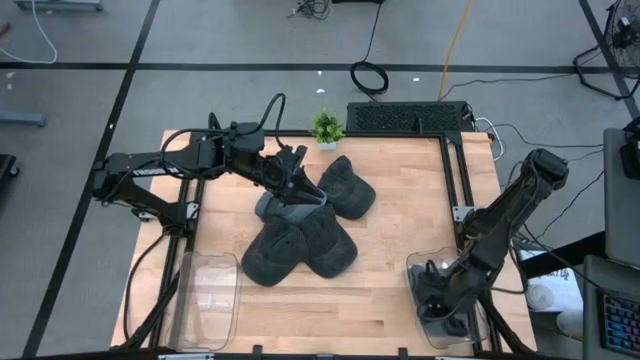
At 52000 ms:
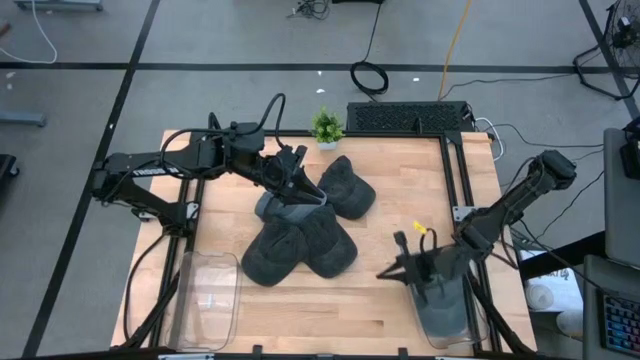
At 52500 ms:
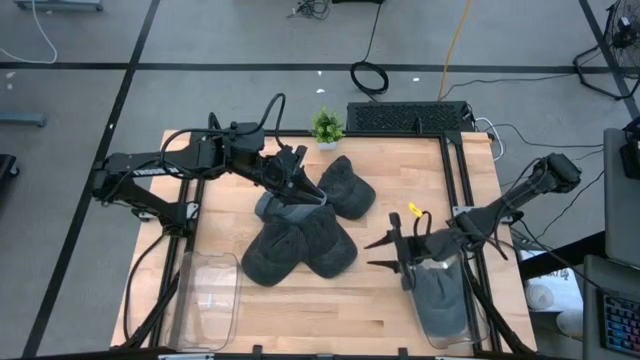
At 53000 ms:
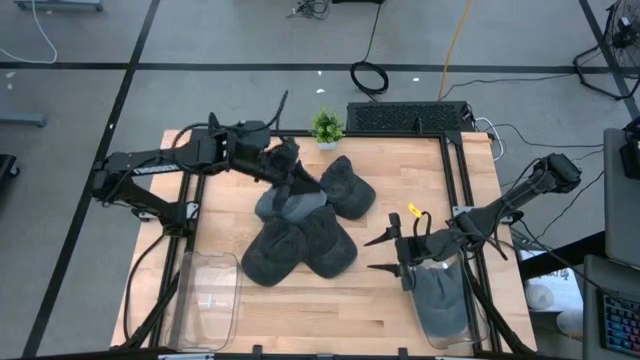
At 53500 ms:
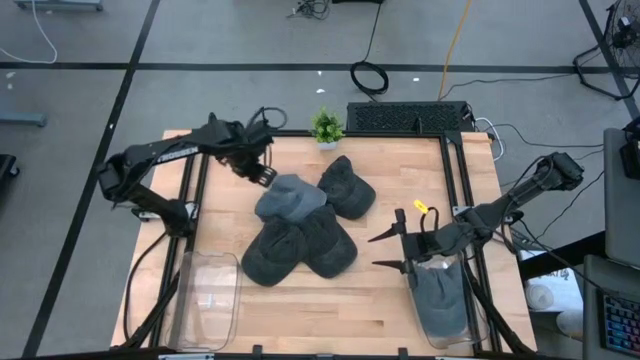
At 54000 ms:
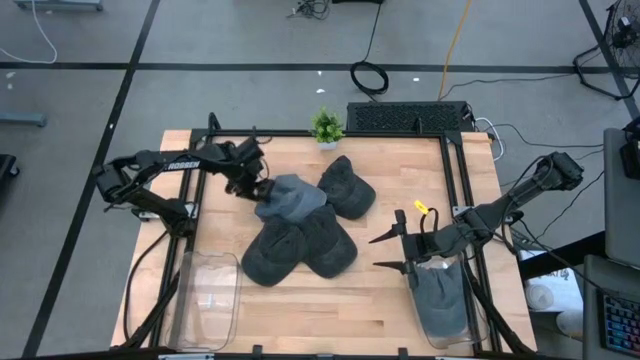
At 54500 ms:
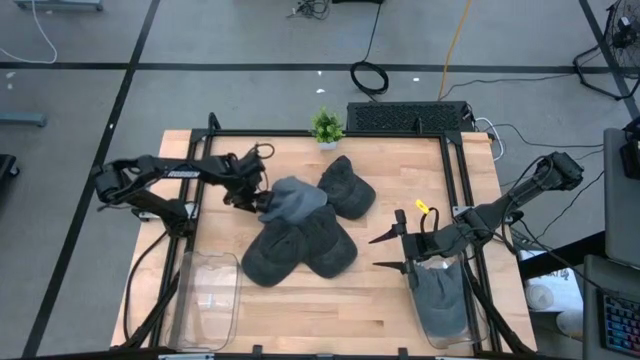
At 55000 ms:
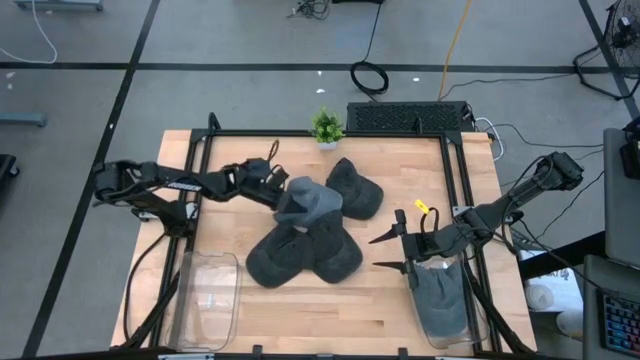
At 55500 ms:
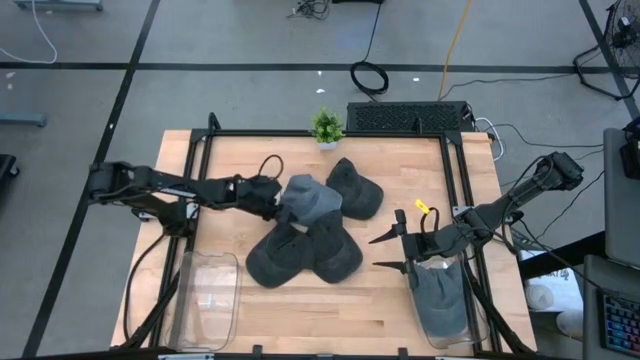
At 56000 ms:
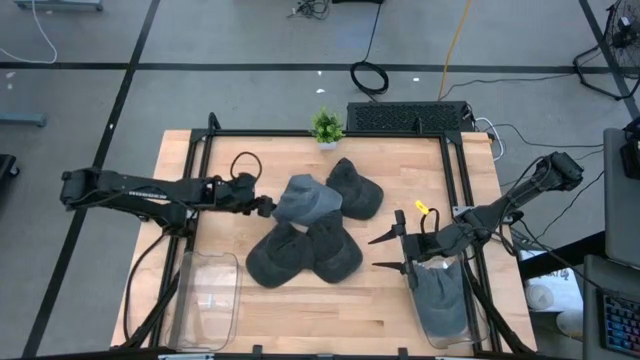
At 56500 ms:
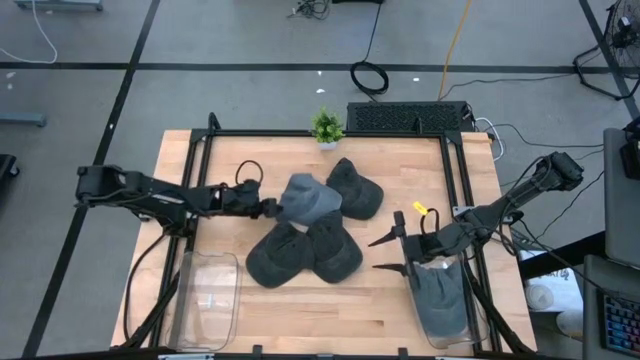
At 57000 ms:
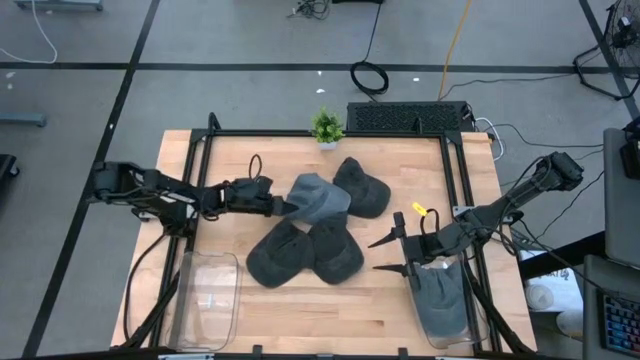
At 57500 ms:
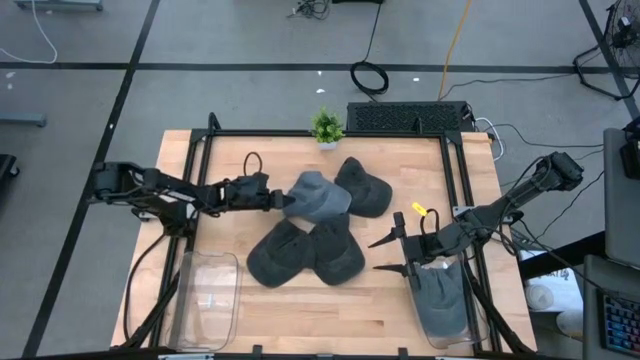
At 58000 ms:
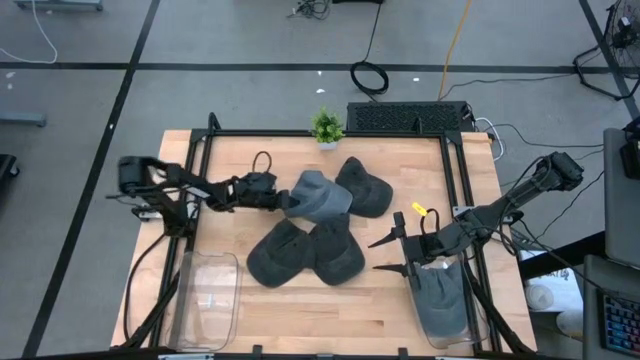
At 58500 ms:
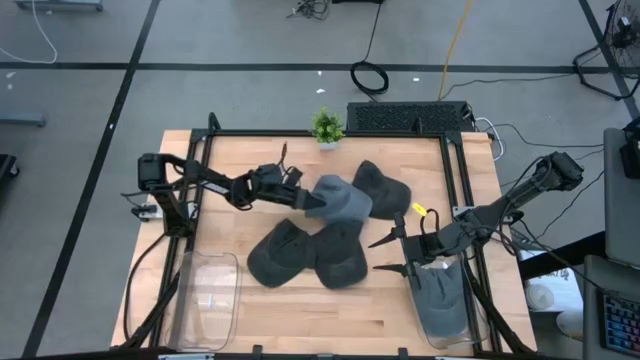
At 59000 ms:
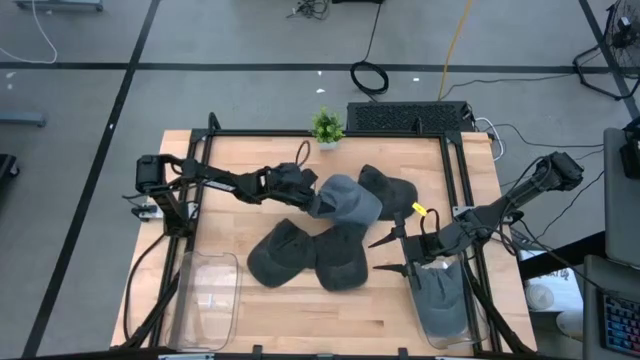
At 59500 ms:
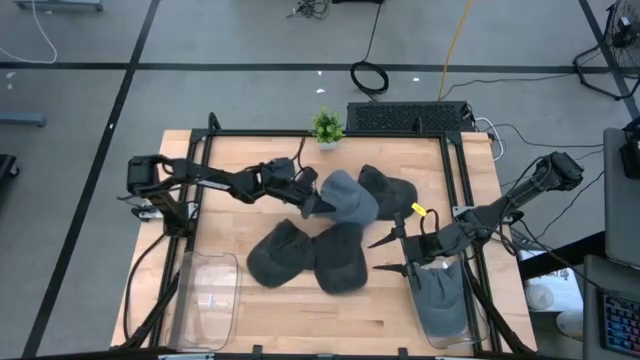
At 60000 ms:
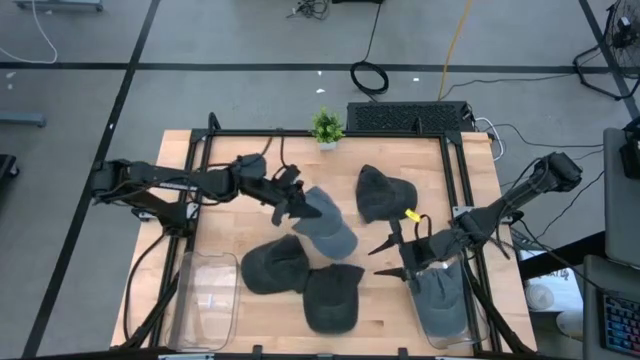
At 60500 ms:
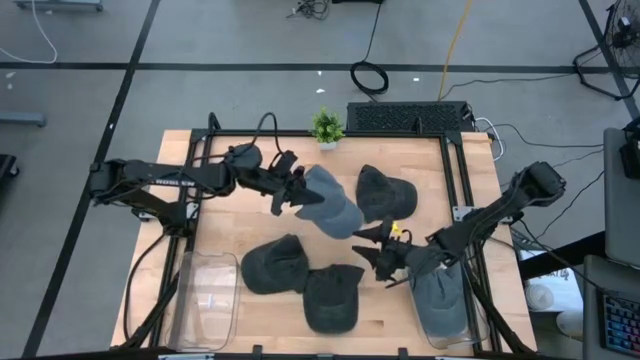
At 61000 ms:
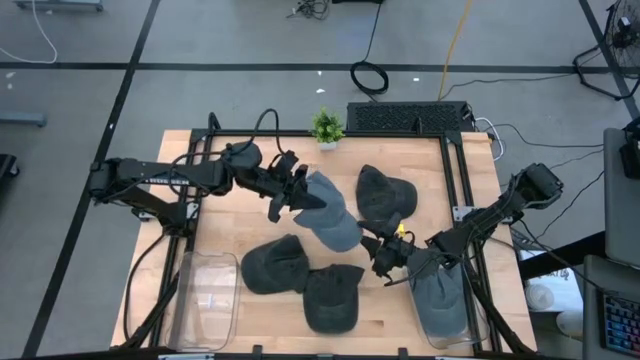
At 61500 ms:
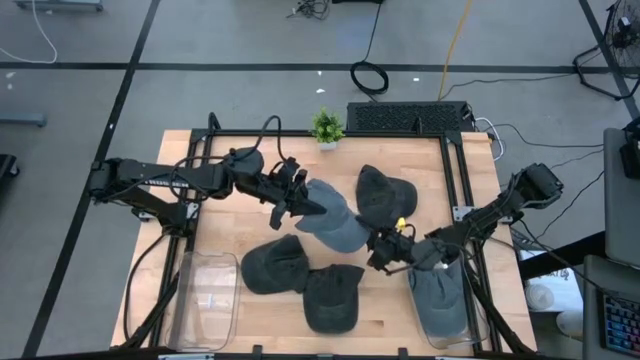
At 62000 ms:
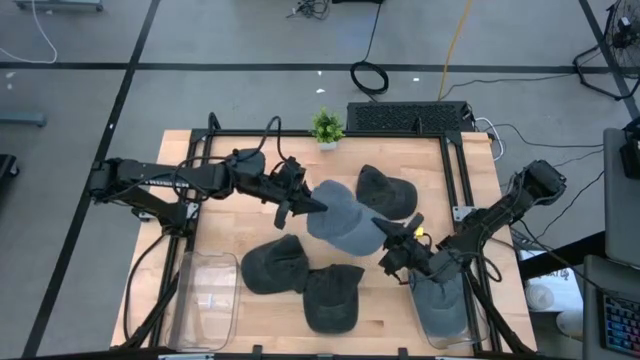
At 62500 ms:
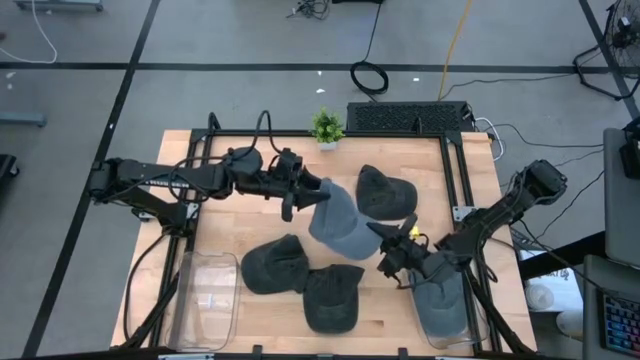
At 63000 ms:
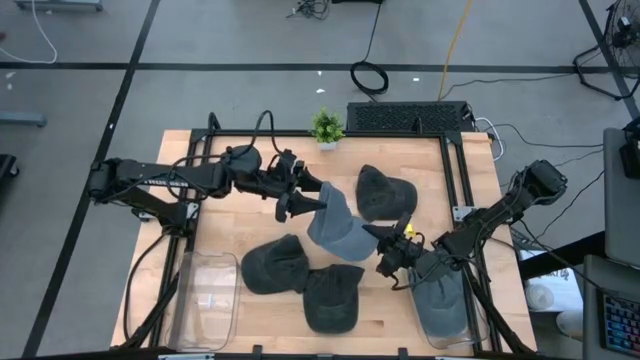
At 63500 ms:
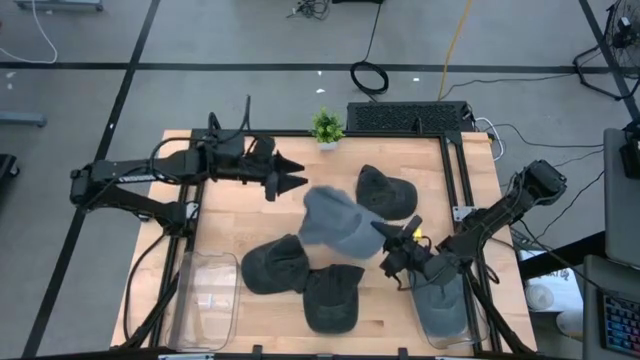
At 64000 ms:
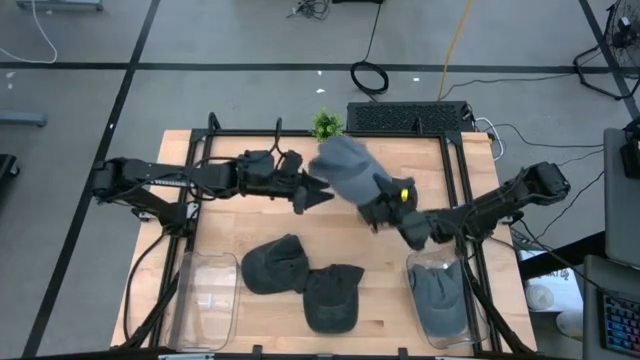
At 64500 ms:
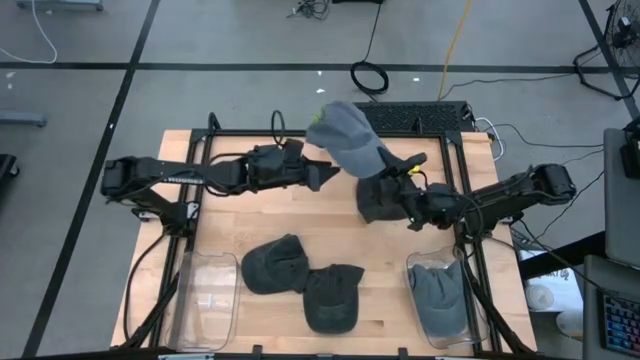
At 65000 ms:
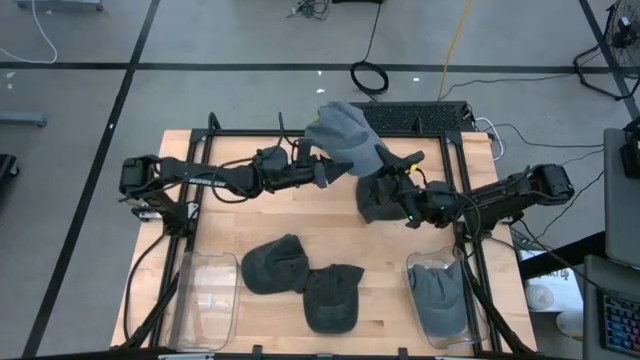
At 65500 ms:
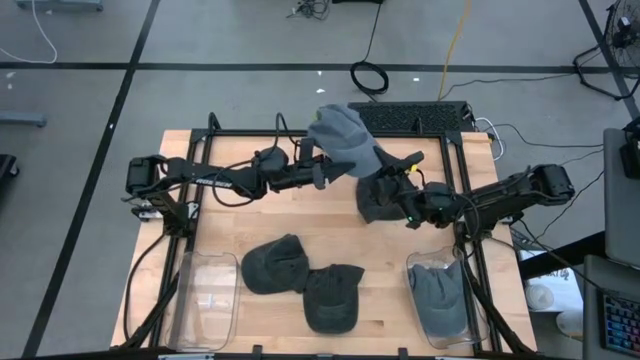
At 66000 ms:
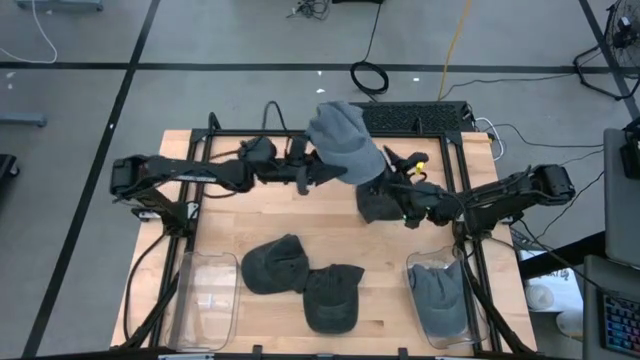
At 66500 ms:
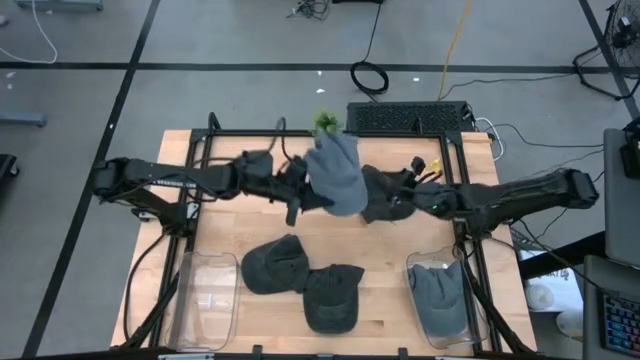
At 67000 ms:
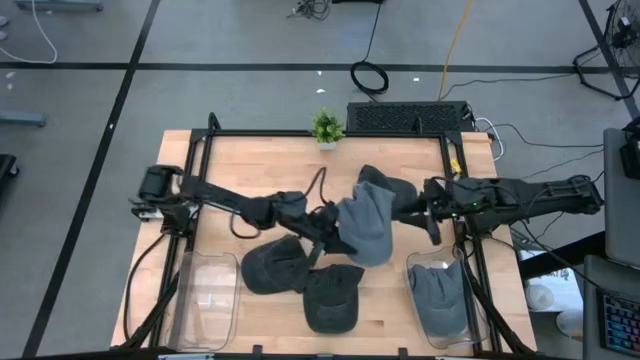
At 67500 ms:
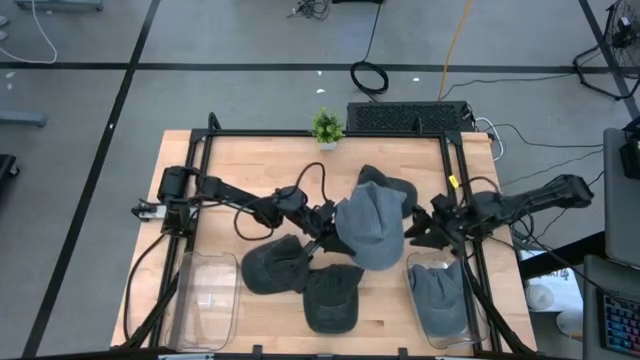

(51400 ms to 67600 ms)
Task: Pick & Place hat
Put the gray cap into the right transparent bin

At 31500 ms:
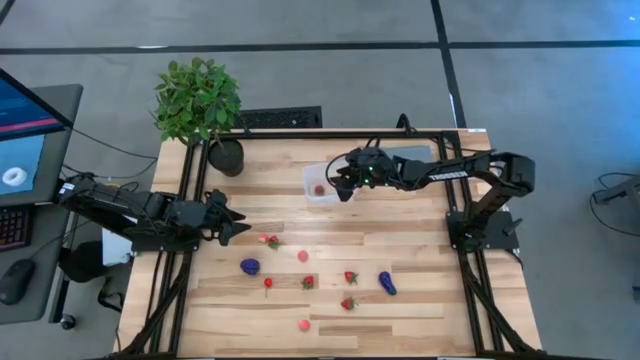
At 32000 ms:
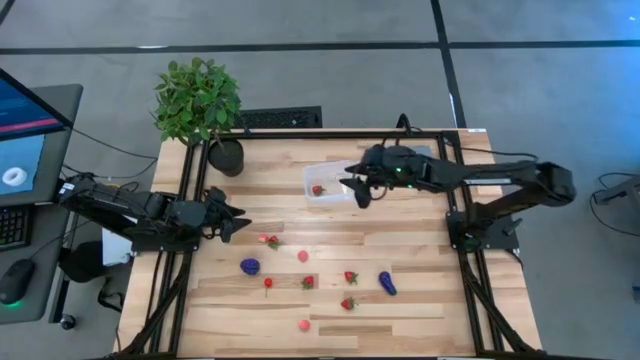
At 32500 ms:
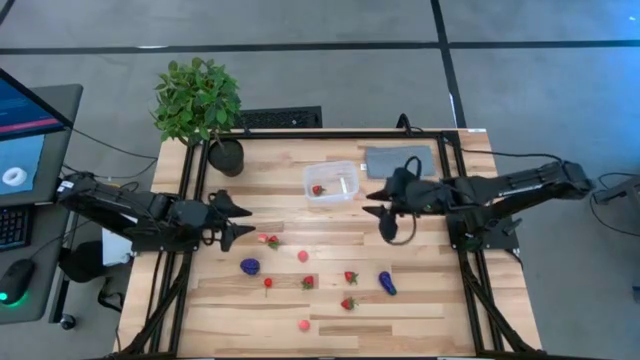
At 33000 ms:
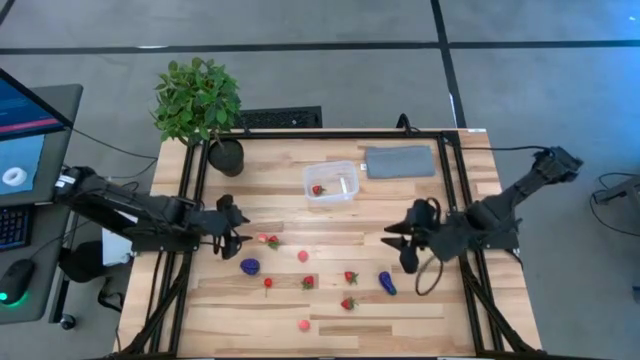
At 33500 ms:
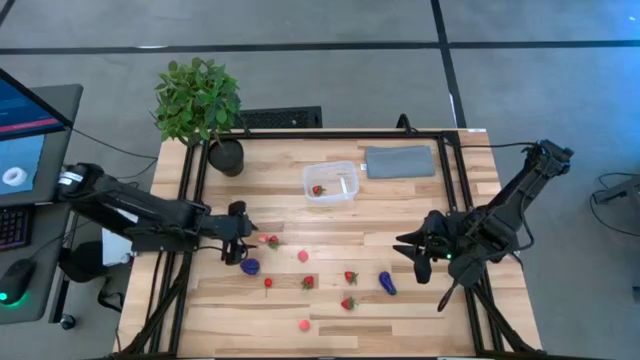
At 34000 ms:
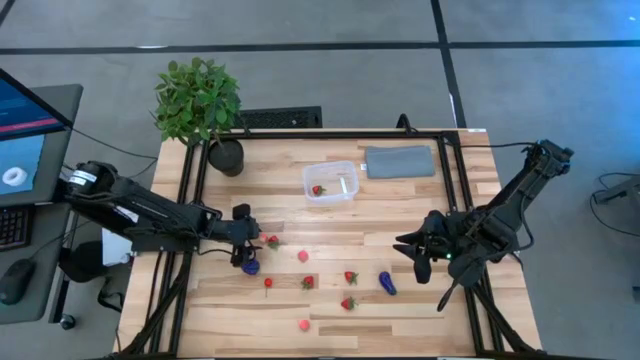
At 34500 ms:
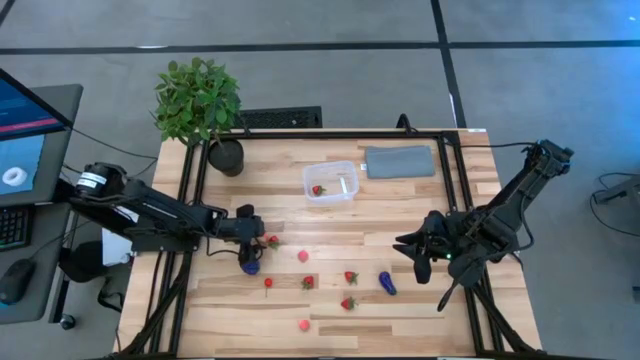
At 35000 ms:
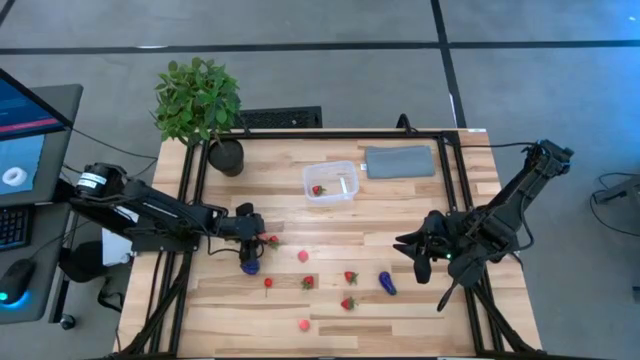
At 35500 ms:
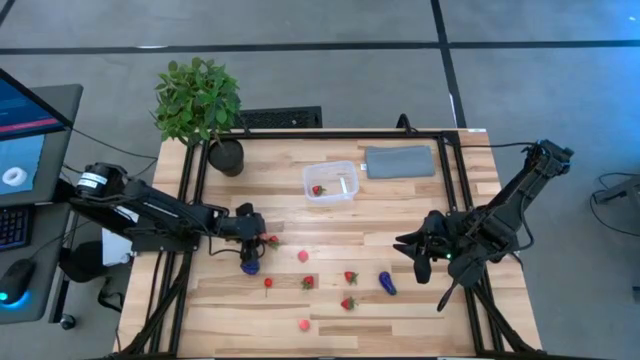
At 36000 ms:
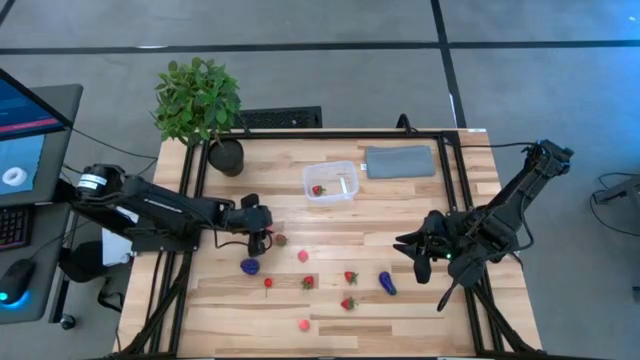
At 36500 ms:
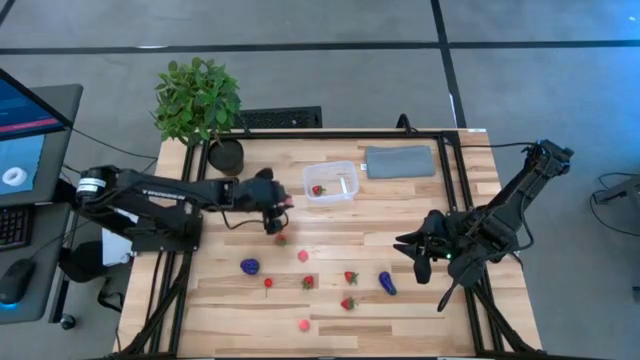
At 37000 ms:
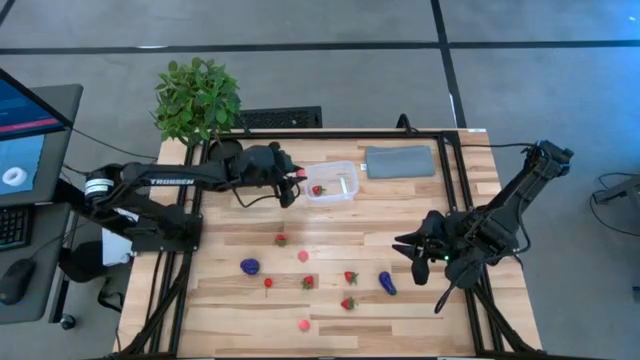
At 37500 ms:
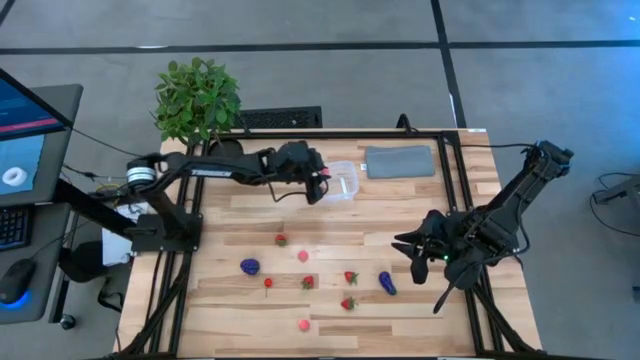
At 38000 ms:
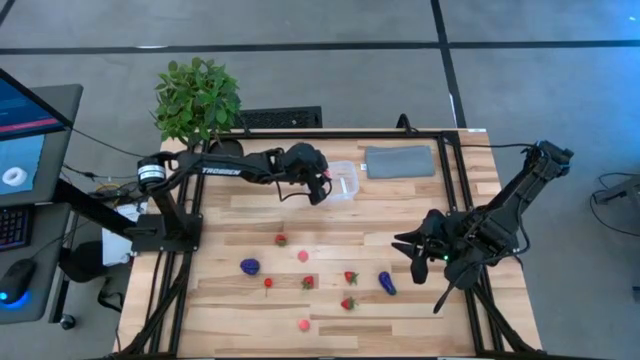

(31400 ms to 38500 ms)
Task: Pick and placing Produce into tupperware
Put the top apricot into the container
